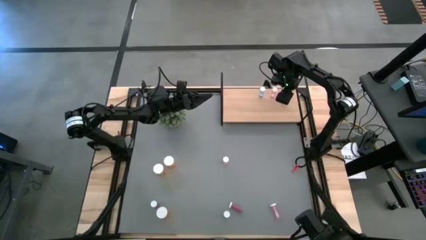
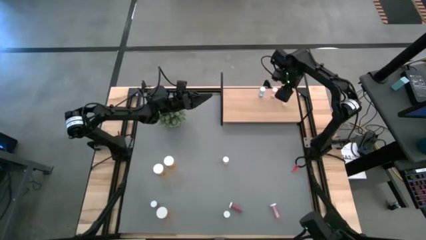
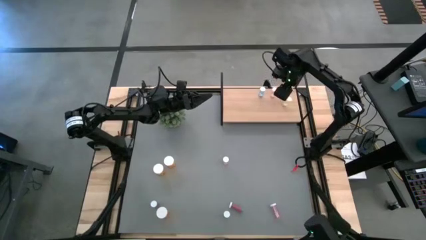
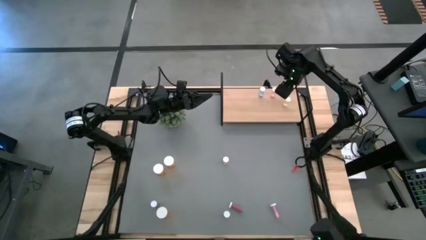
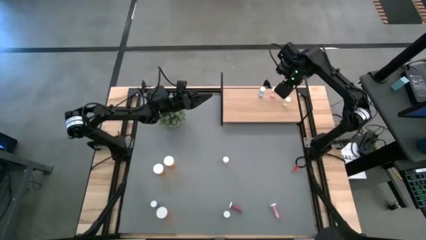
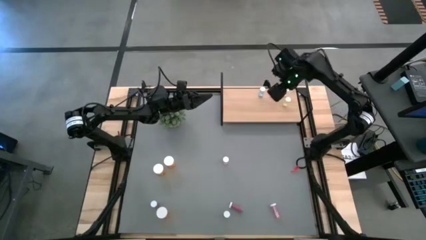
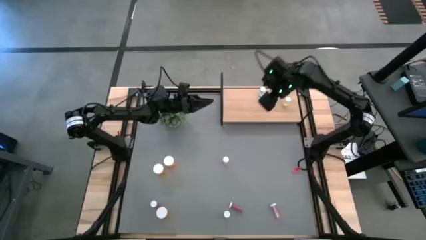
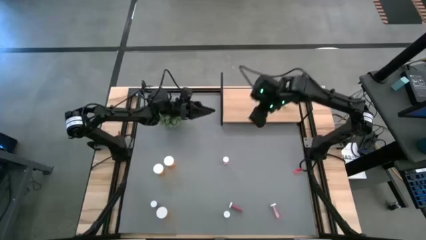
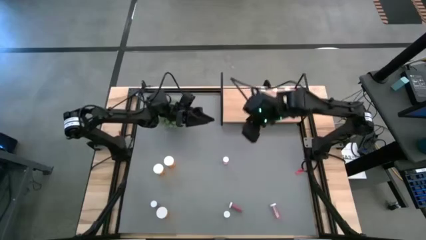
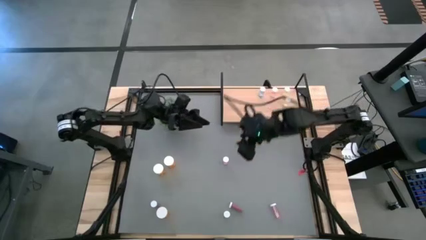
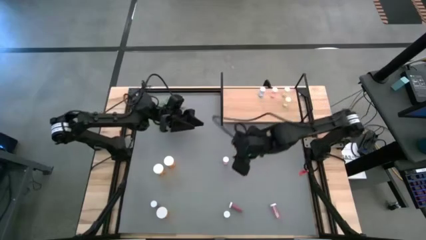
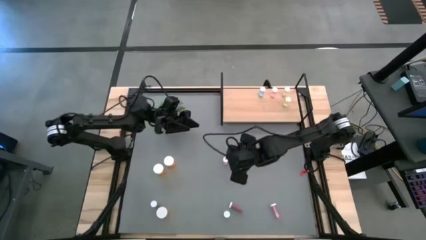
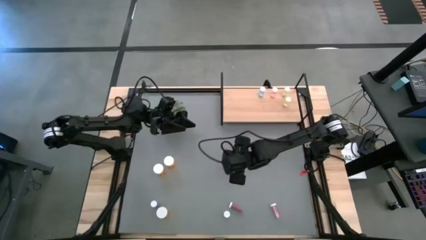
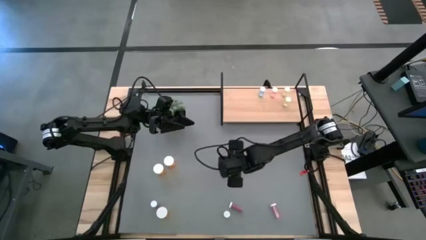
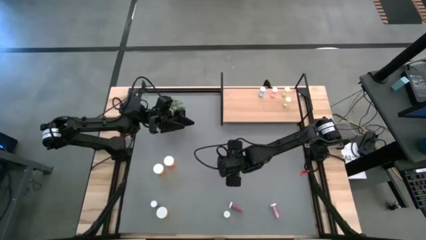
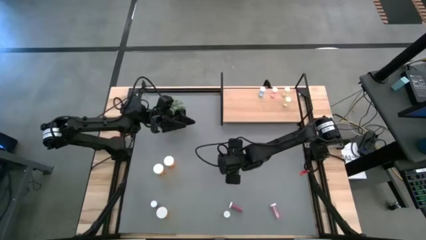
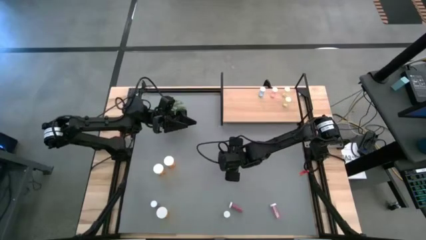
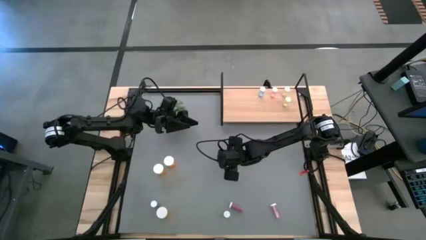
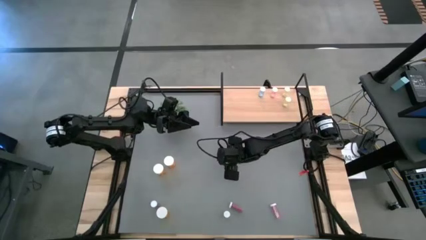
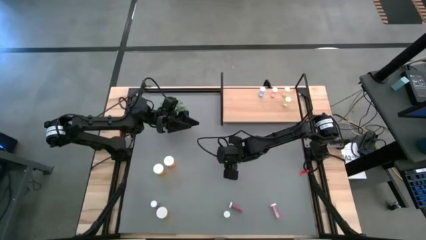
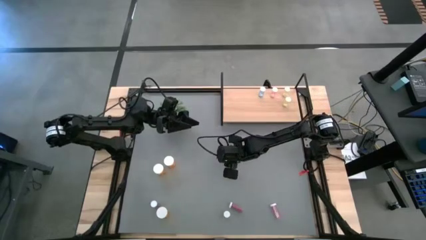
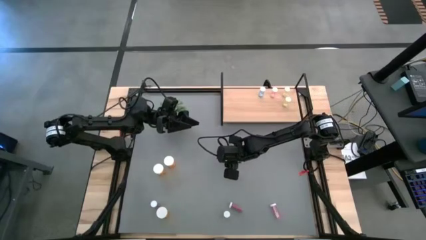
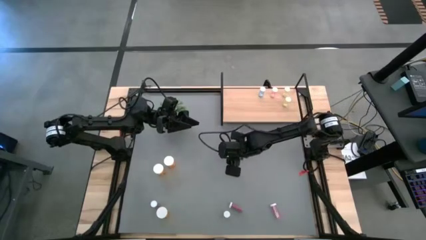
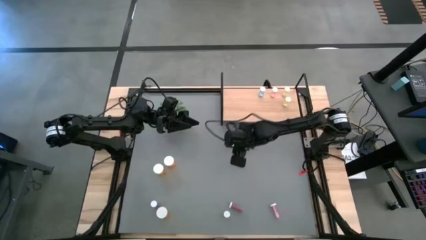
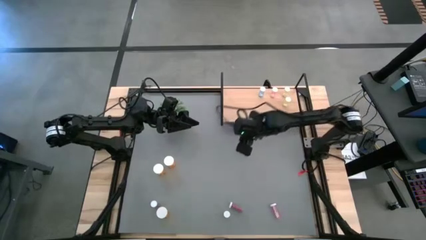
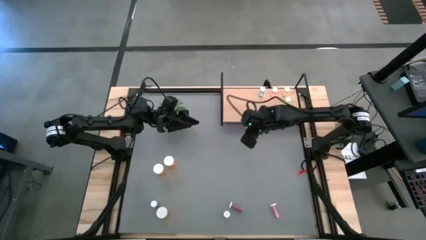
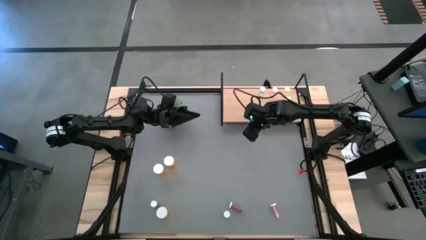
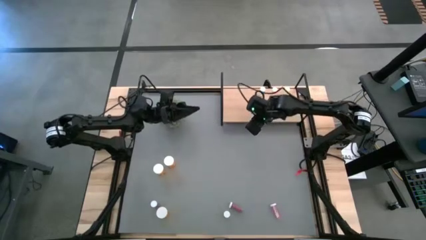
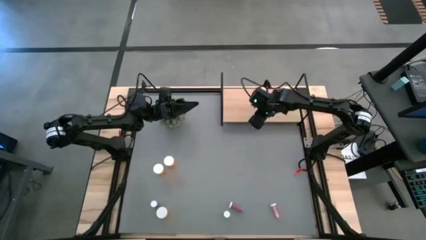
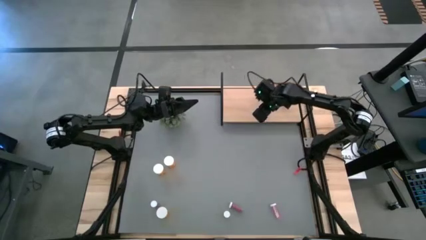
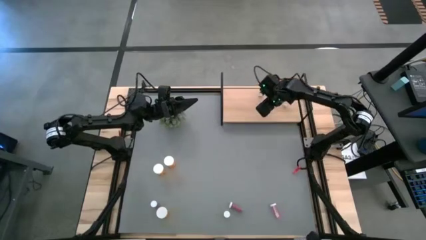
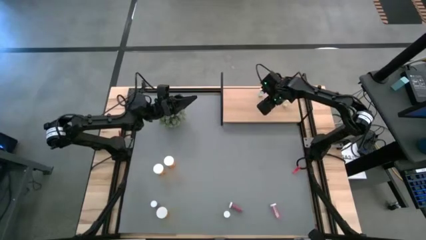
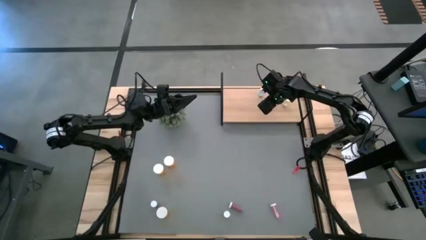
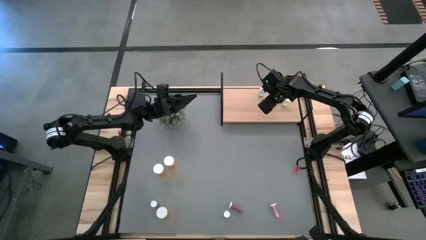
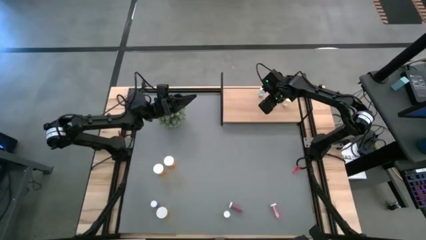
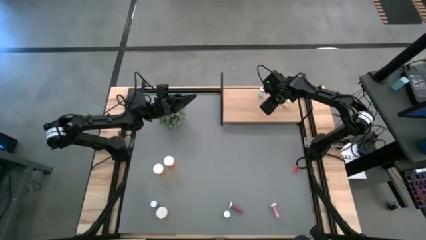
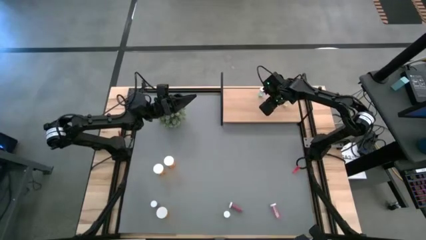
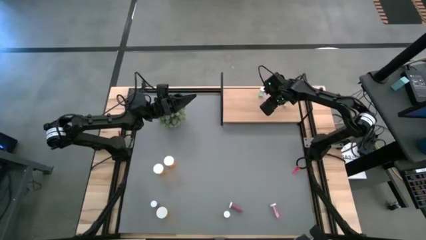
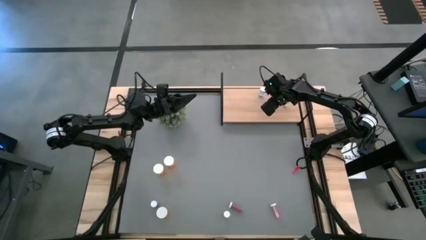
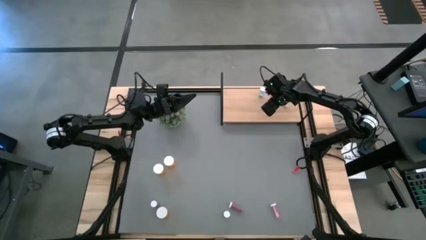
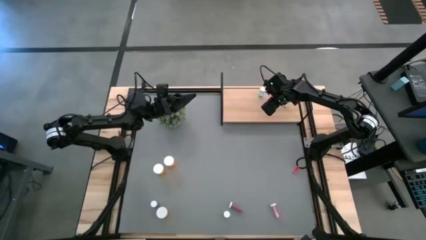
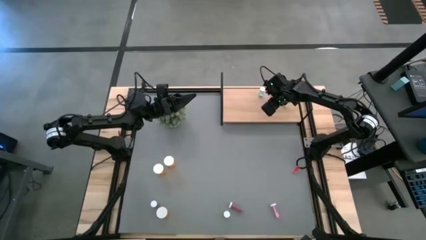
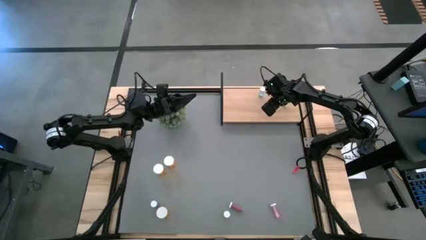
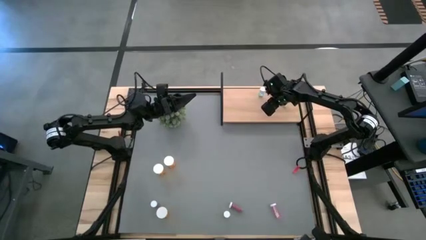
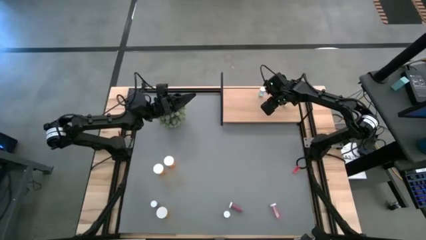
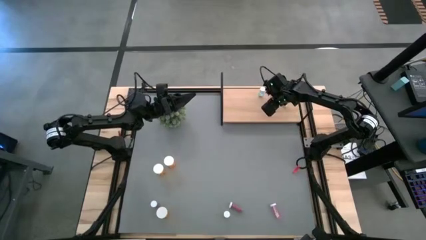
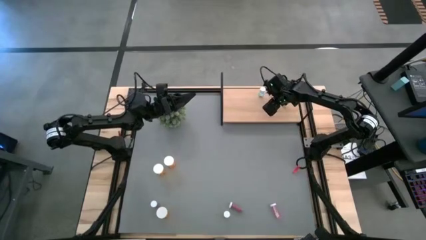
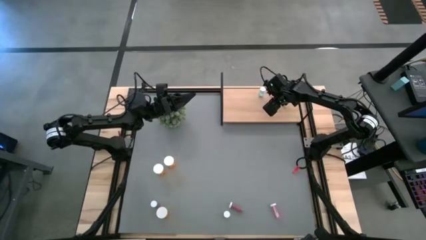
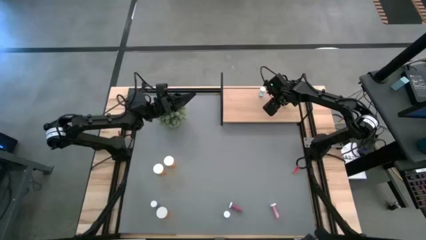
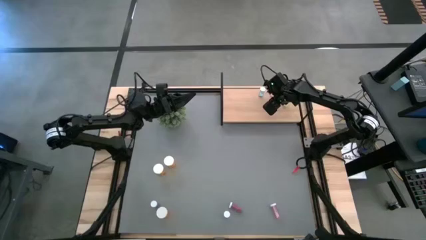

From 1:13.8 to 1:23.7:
Task: Pick and place medicine bottles onto shelf by color
Put the top pink pill bottle on the shelf aligned with the other pink pill bottle
